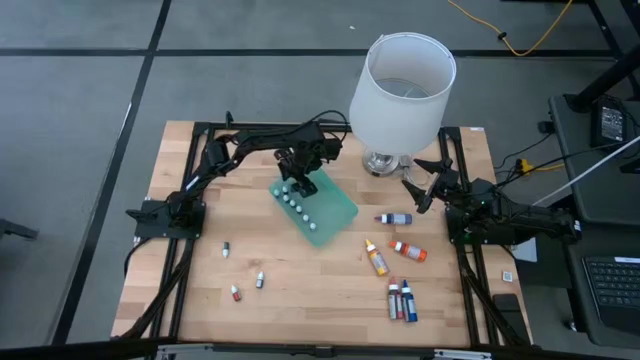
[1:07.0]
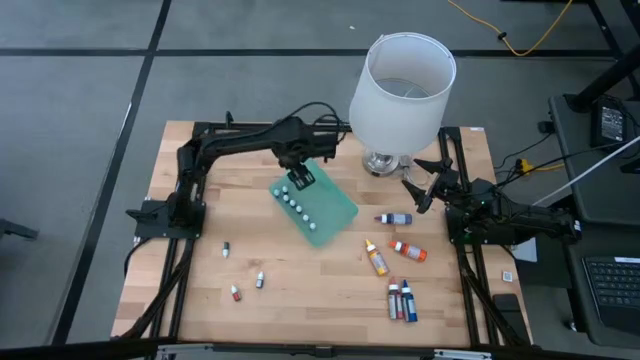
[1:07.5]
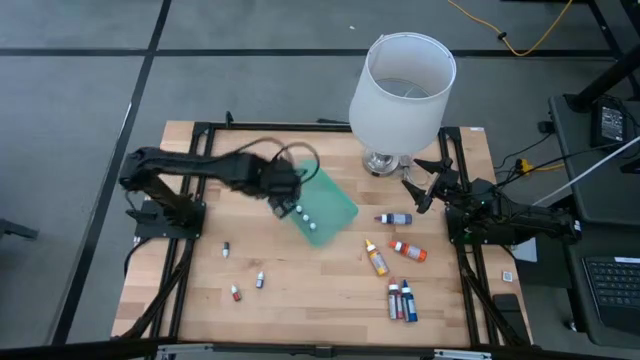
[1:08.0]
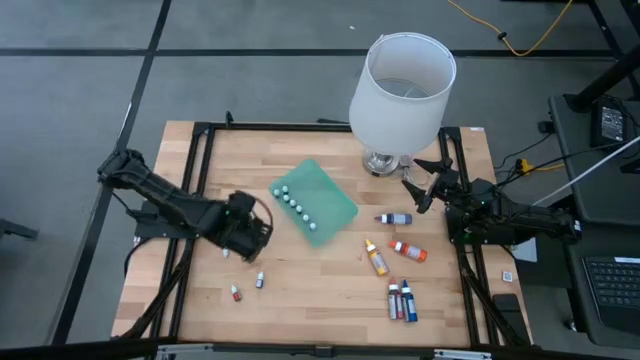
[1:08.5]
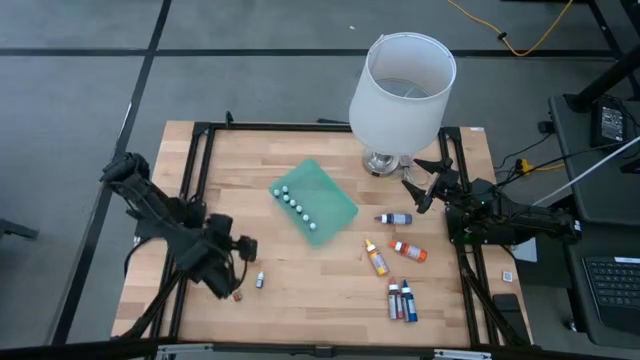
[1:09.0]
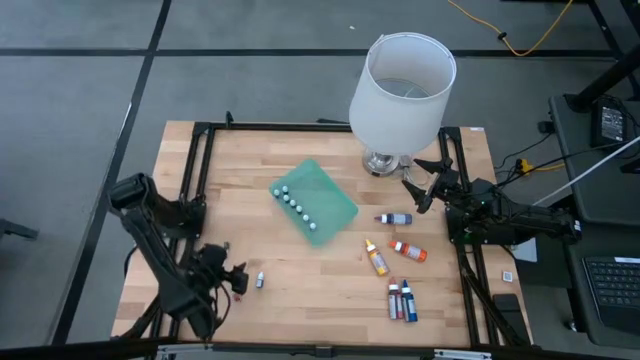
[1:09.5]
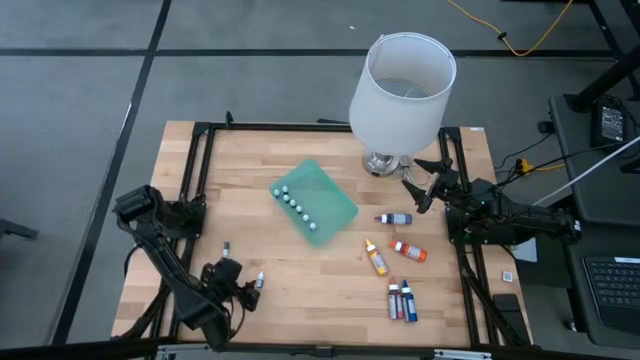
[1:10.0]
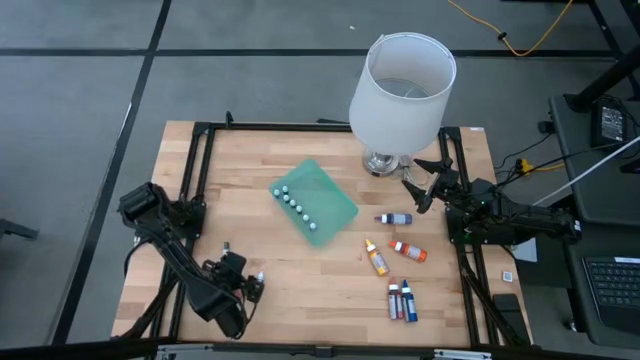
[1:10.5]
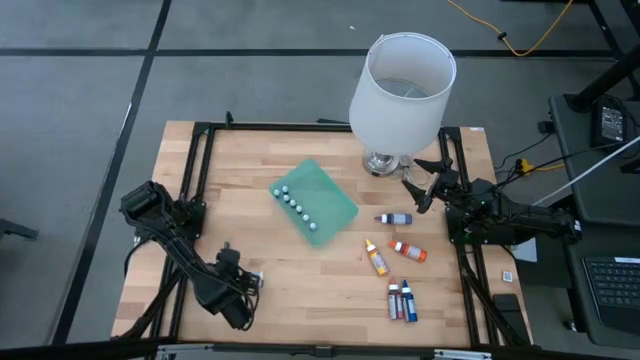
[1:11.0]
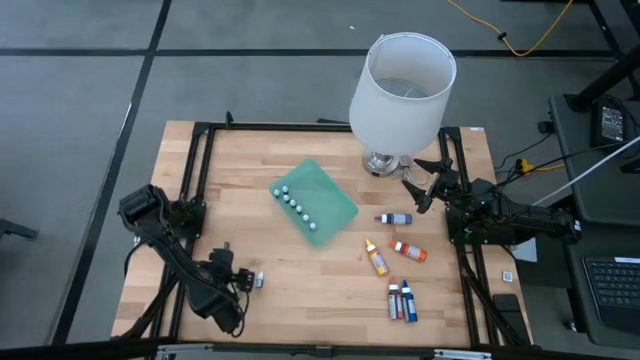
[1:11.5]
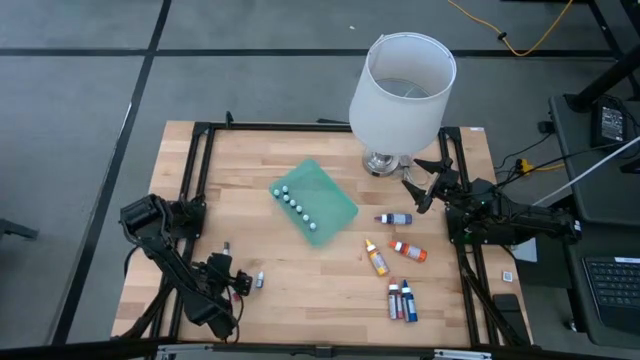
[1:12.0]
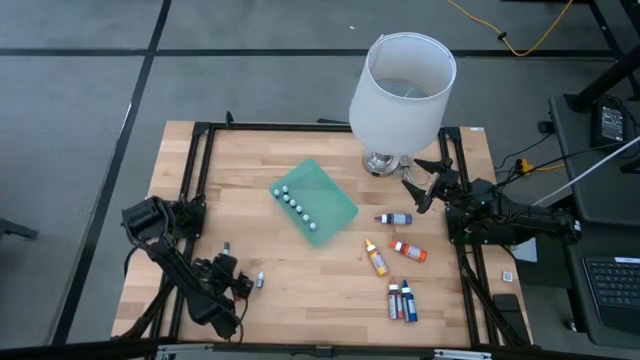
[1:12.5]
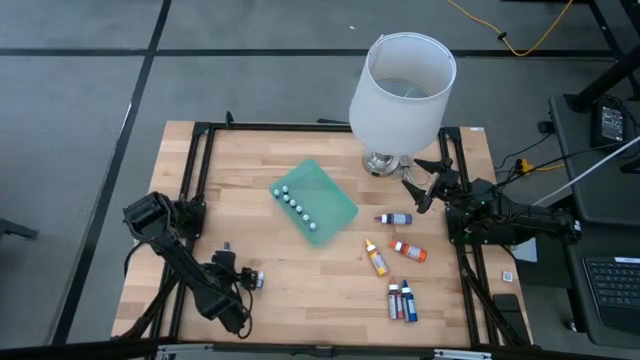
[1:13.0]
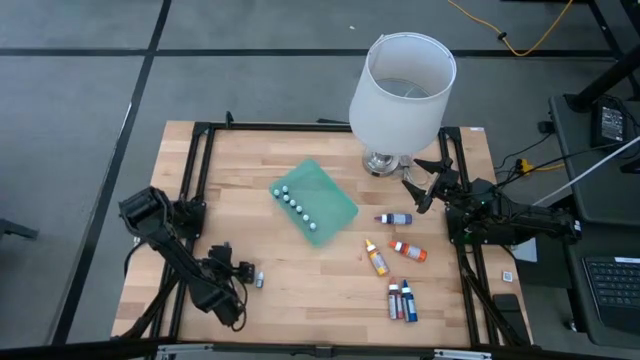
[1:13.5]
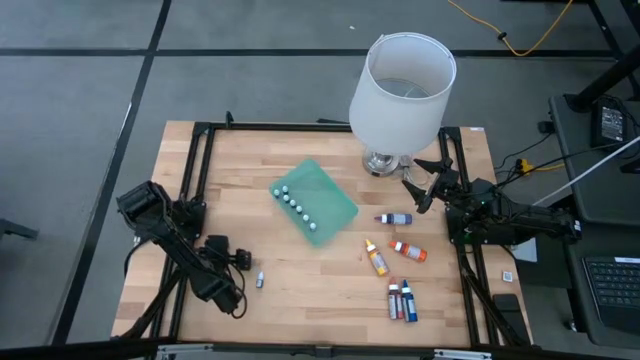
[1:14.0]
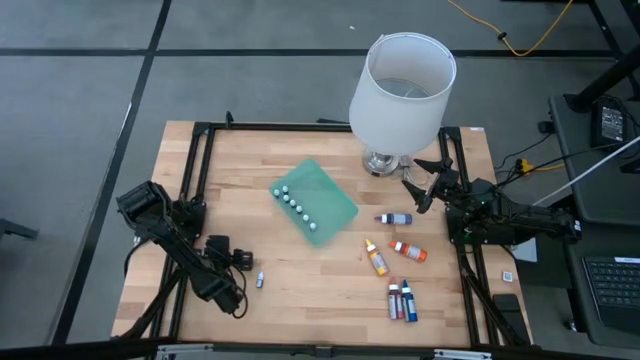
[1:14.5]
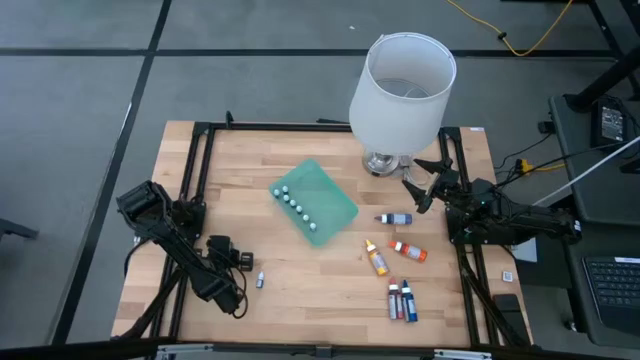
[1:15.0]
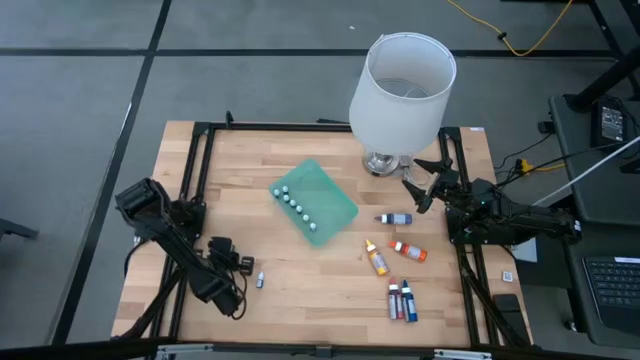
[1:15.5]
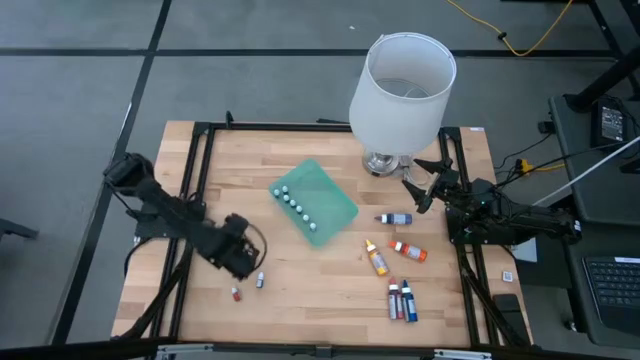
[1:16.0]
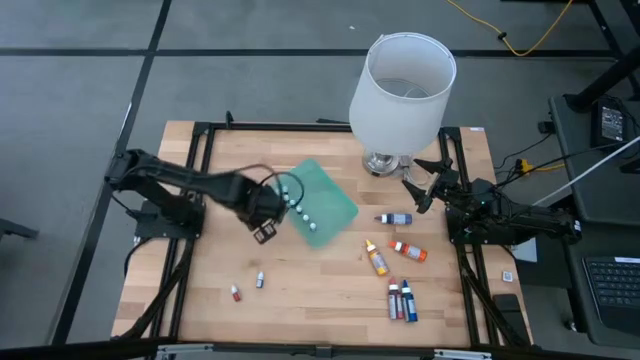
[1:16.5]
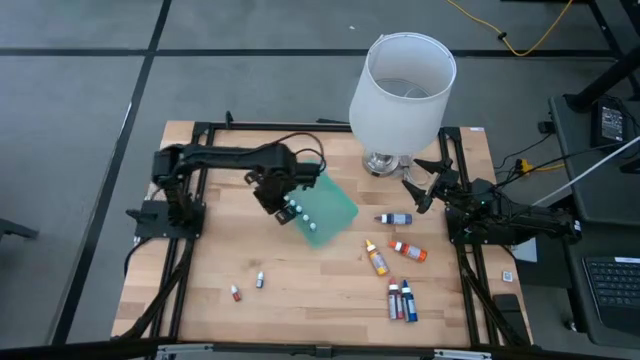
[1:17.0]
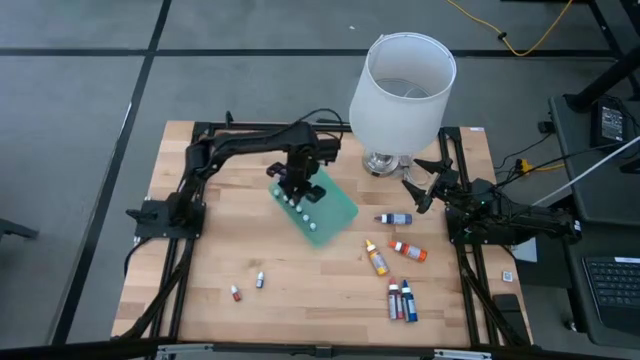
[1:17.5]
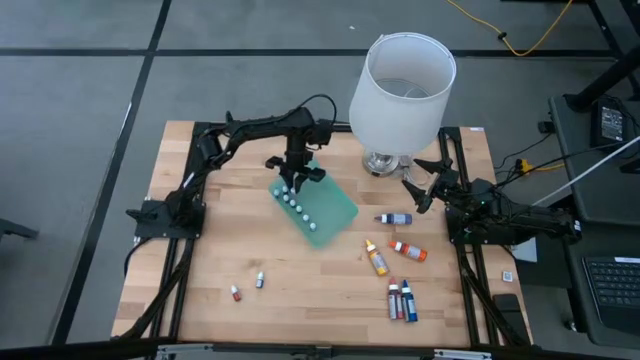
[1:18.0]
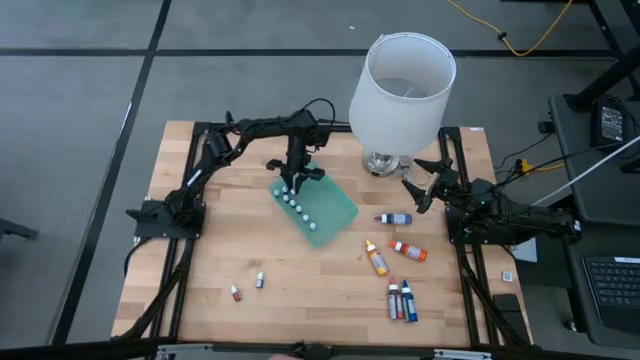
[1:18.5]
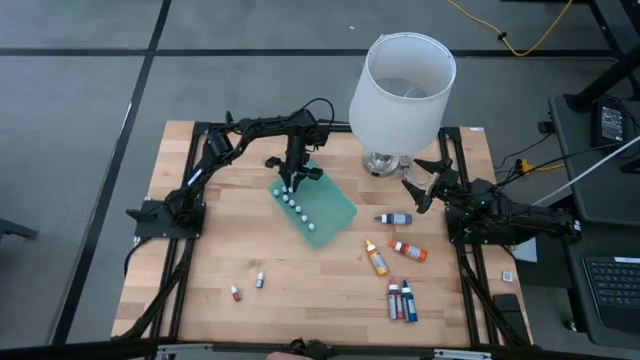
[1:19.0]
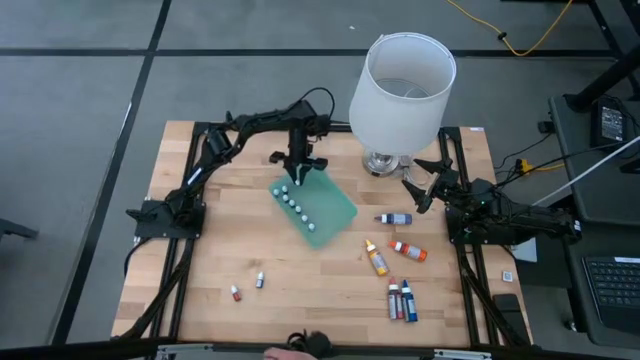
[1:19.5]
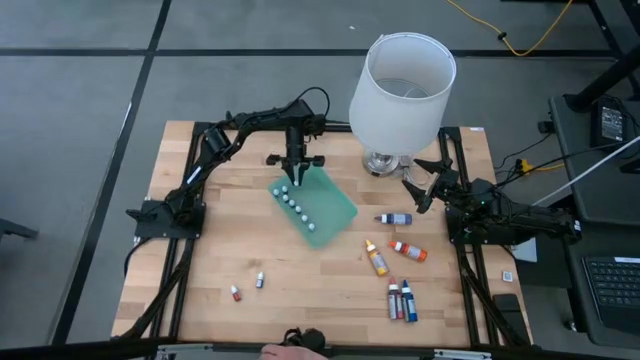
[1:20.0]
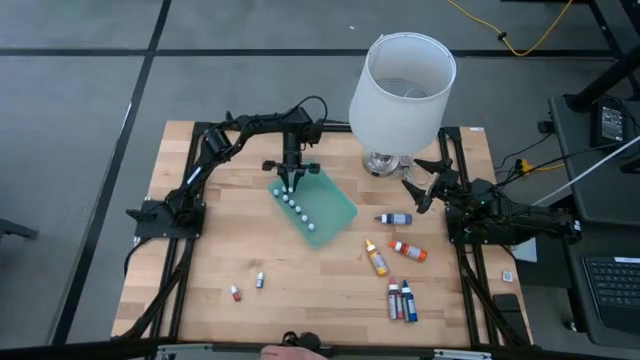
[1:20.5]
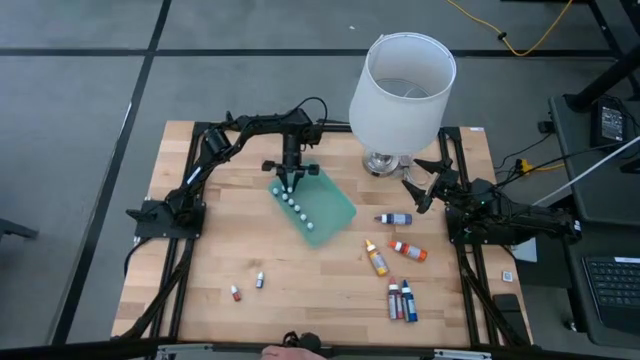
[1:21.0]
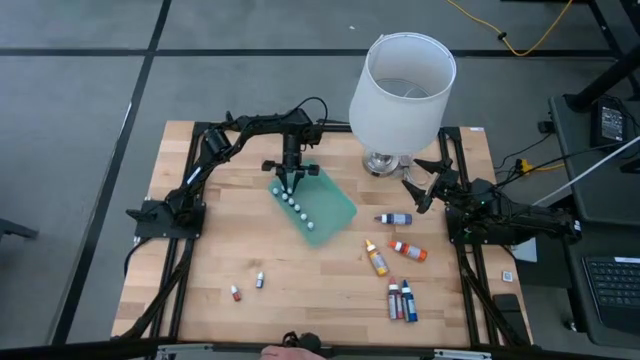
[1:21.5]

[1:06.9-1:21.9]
Task: Pick & Place food coloring
Put the small green food coloring bottle into the green bin

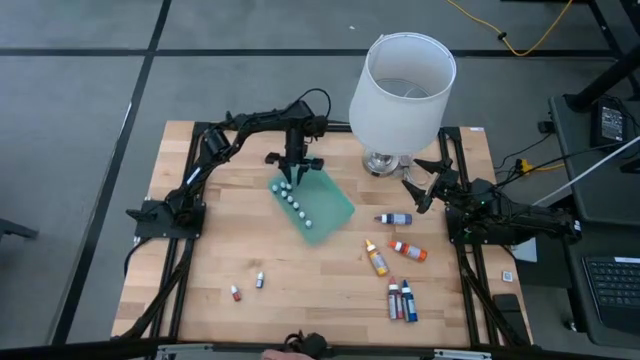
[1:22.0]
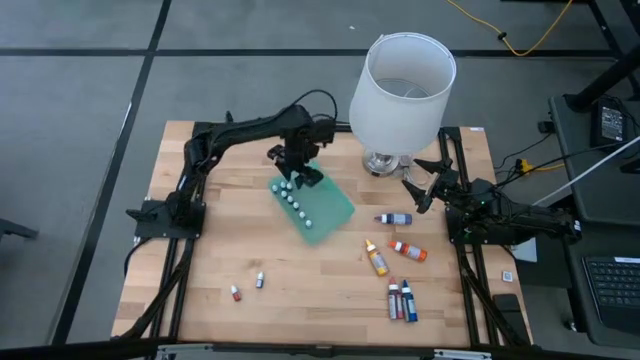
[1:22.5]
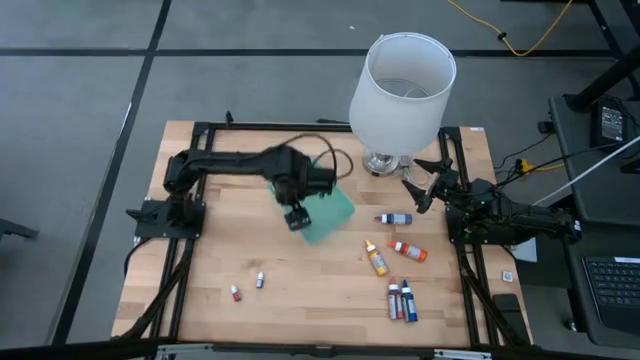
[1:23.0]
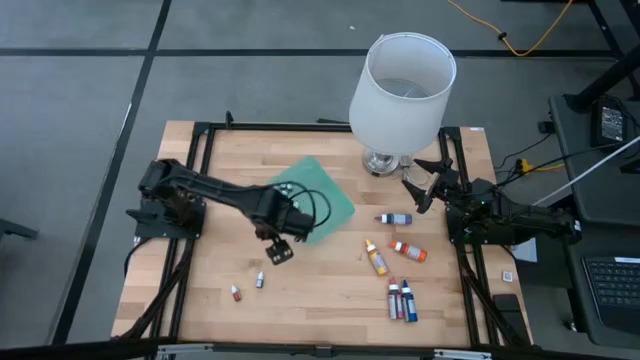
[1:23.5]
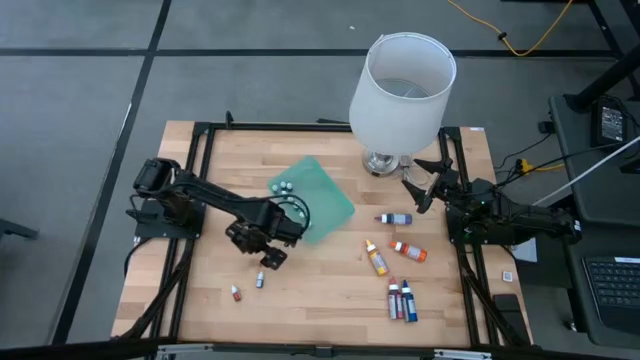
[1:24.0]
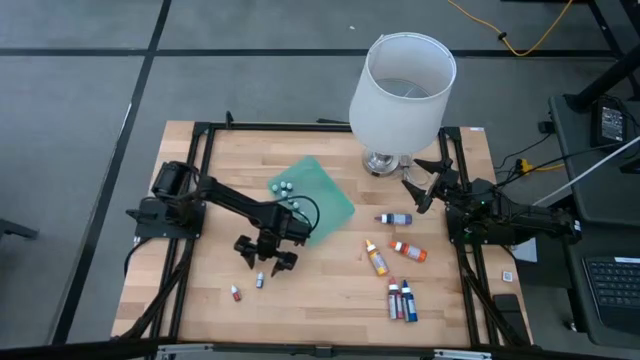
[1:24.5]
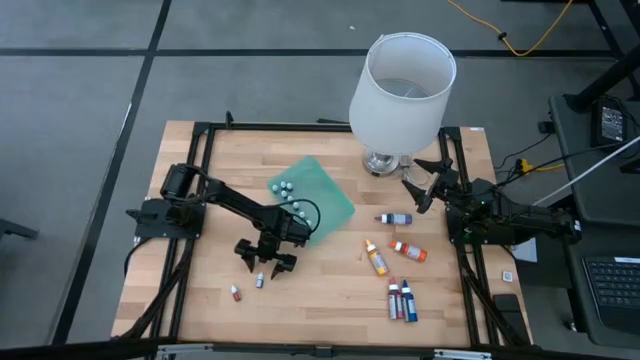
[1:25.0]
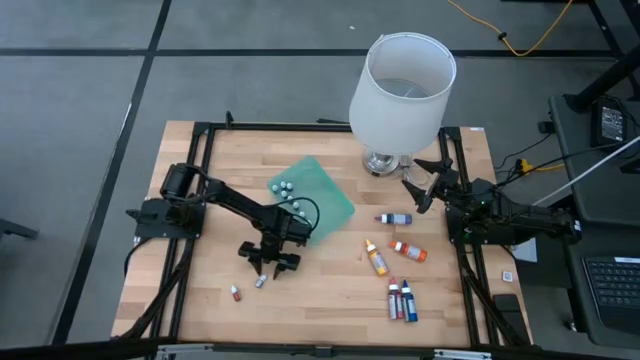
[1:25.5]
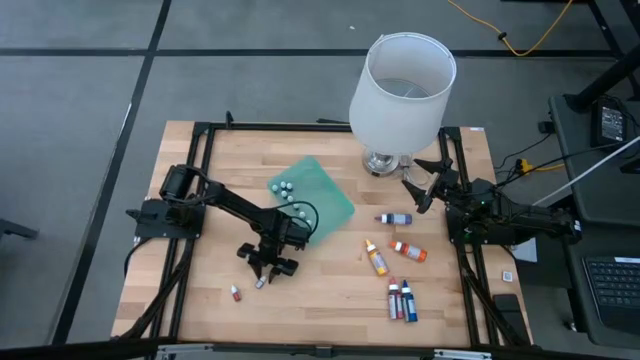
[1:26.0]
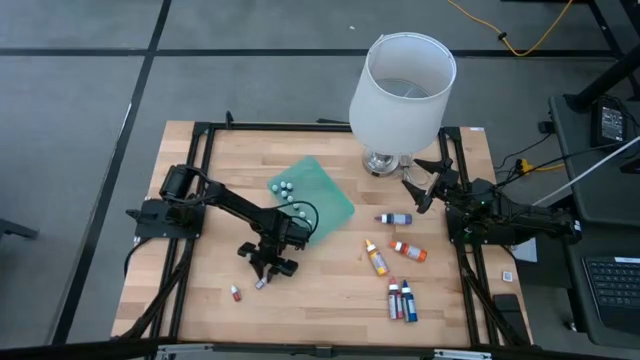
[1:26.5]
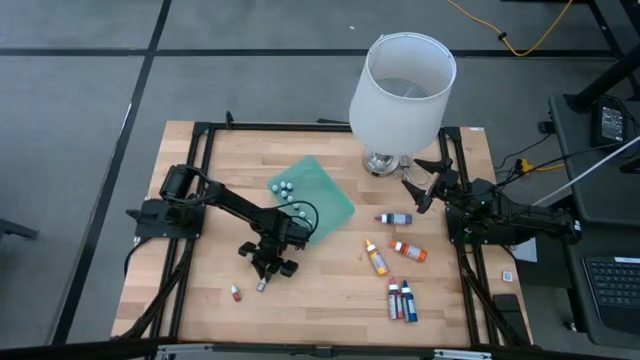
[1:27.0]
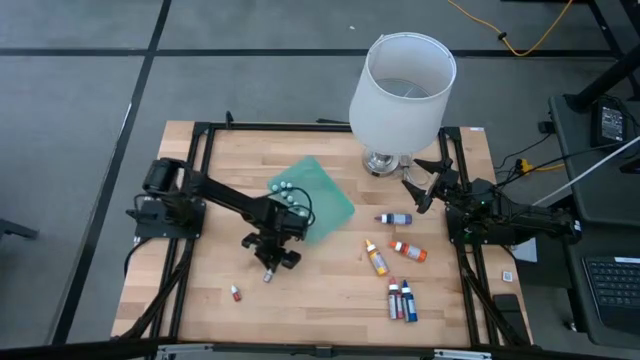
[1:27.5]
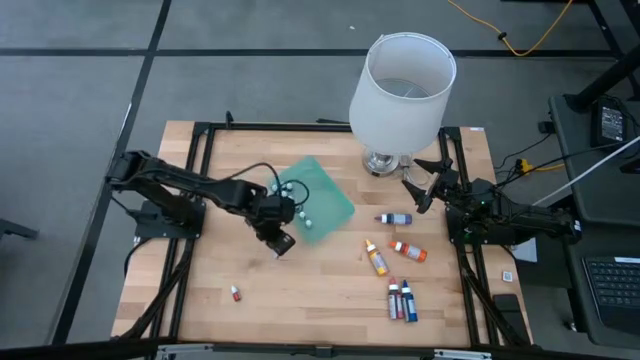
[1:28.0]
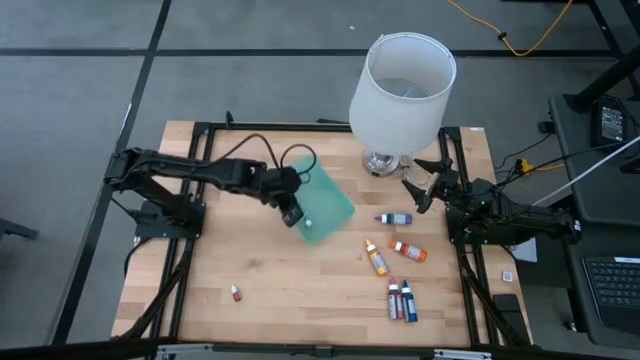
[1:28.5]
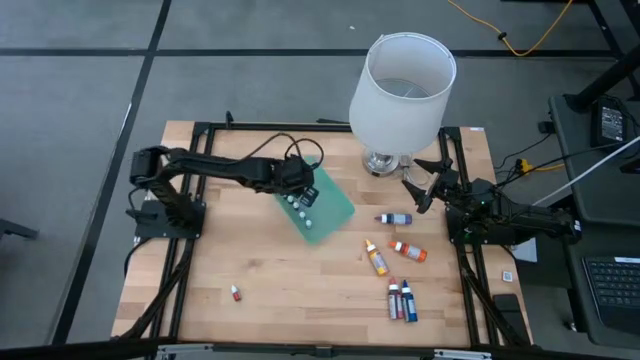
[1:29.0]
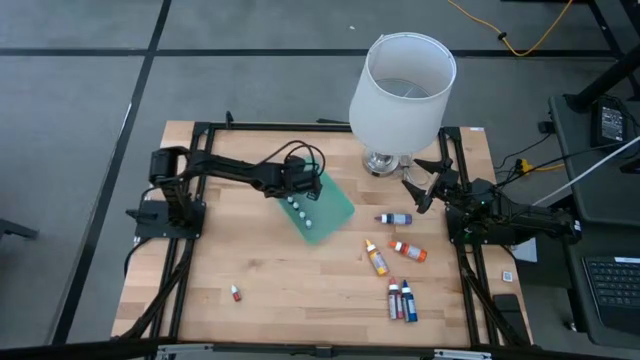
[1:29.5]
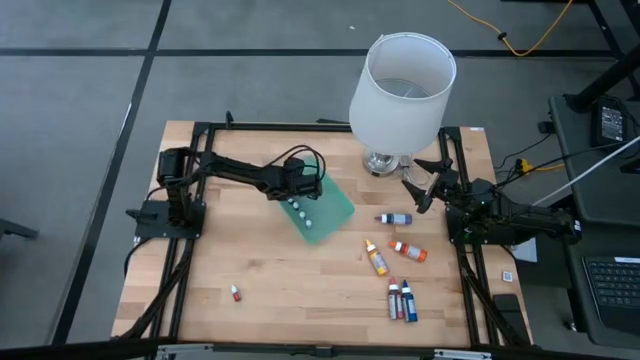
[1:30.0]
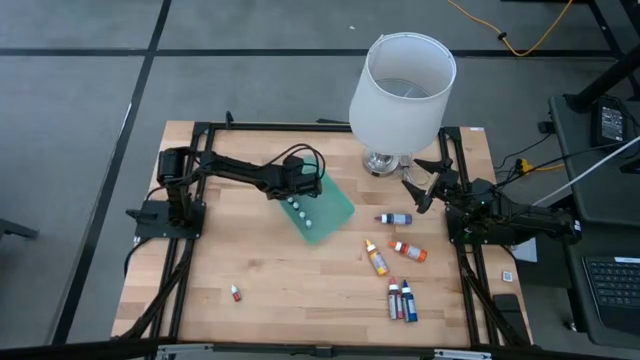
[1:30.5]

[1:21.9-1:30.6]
Put the right small red food coloring bottle into the green bin
